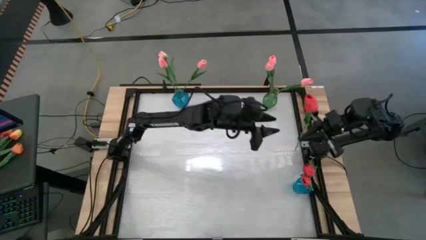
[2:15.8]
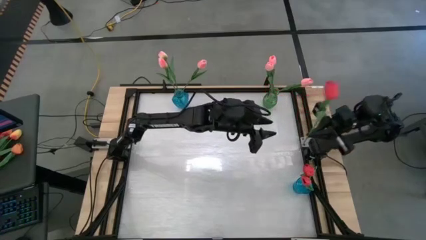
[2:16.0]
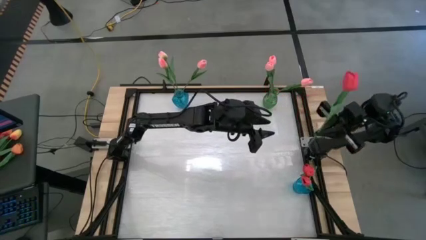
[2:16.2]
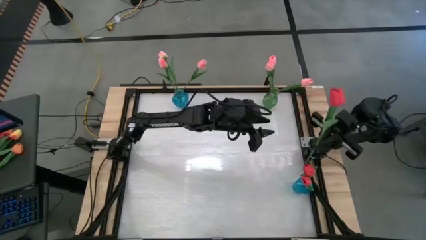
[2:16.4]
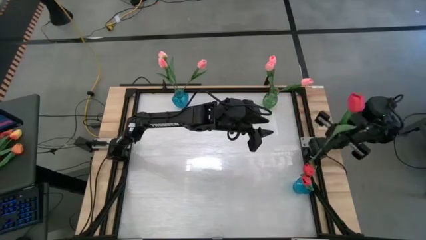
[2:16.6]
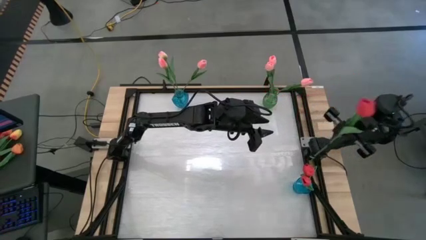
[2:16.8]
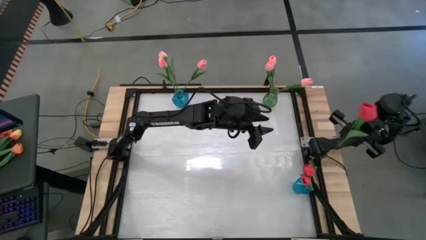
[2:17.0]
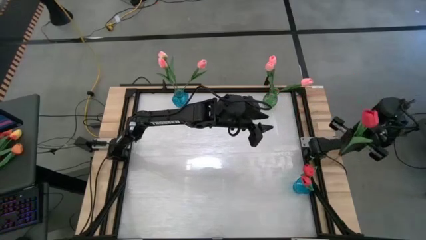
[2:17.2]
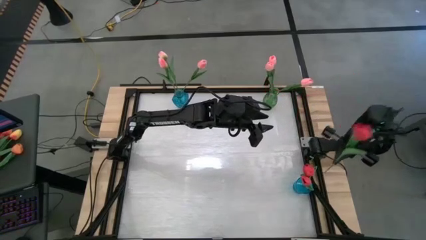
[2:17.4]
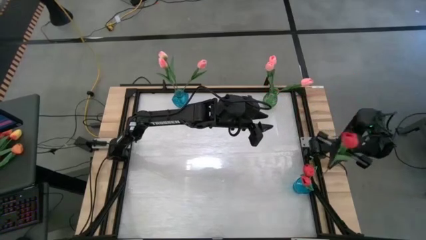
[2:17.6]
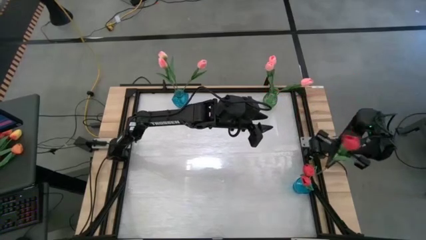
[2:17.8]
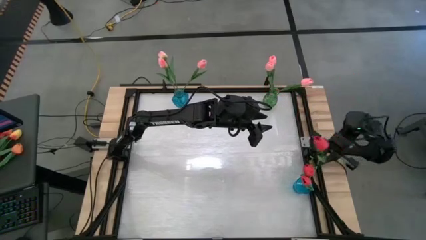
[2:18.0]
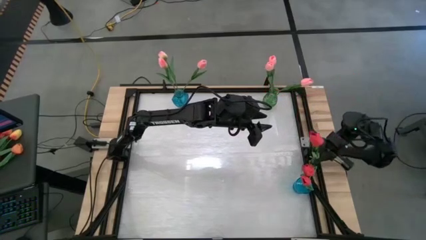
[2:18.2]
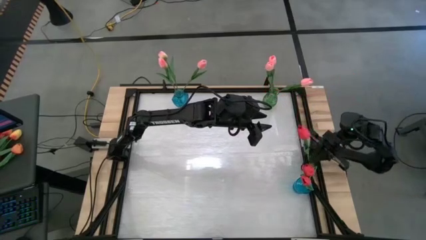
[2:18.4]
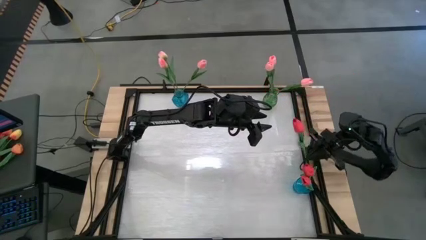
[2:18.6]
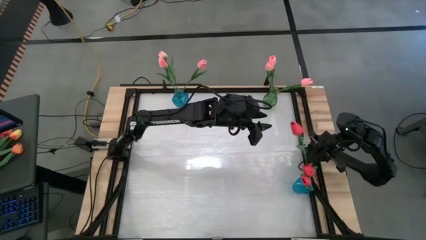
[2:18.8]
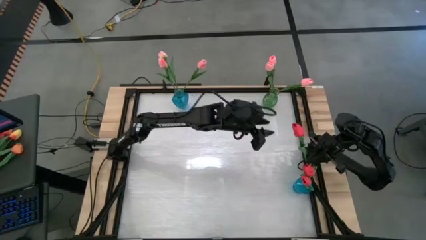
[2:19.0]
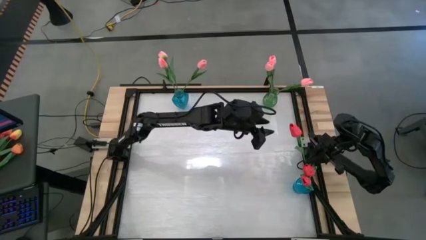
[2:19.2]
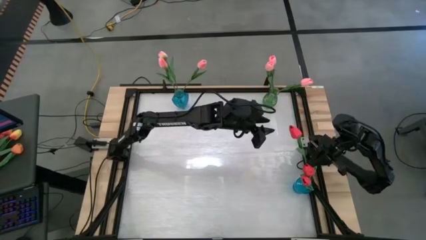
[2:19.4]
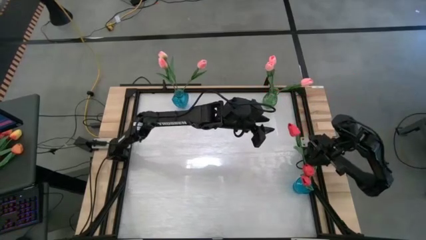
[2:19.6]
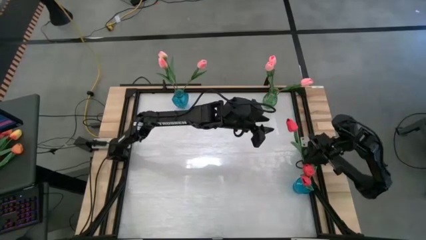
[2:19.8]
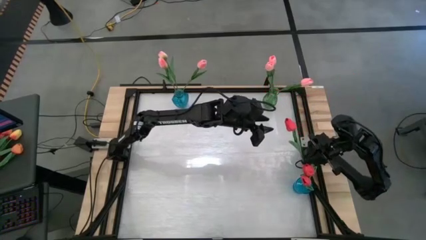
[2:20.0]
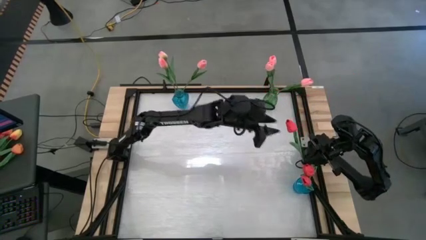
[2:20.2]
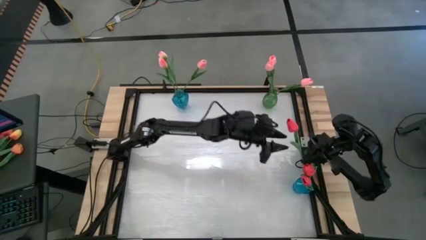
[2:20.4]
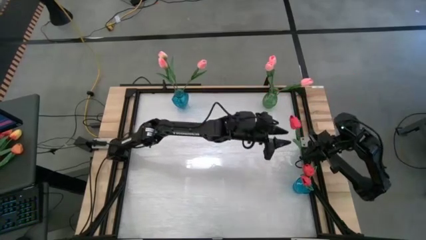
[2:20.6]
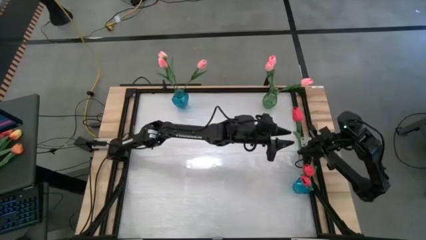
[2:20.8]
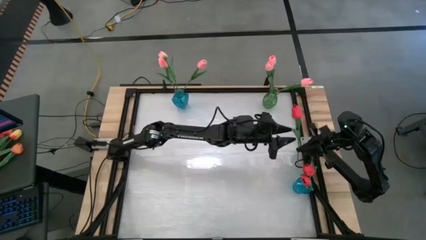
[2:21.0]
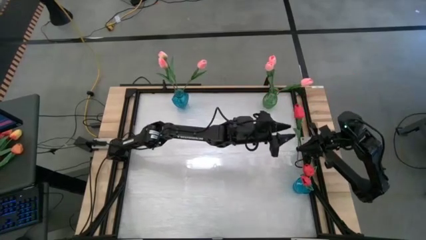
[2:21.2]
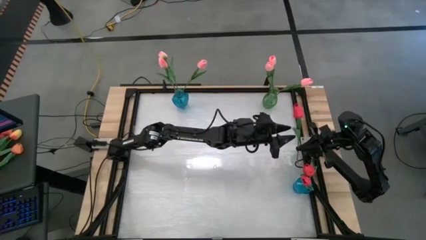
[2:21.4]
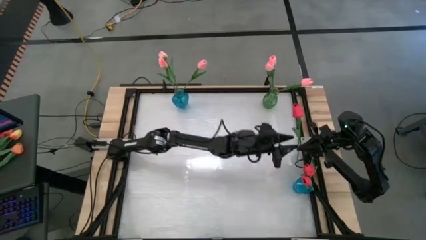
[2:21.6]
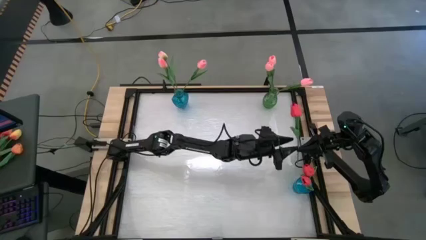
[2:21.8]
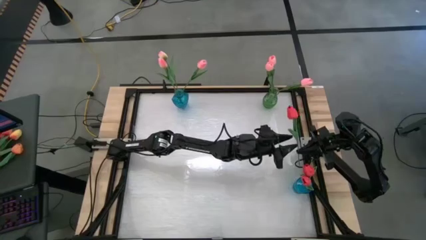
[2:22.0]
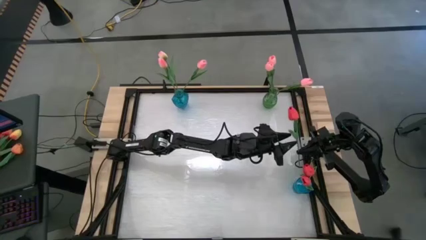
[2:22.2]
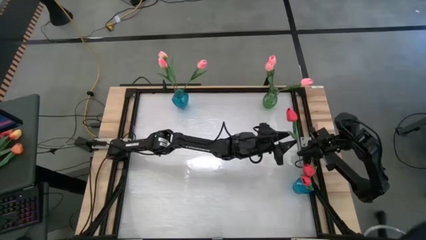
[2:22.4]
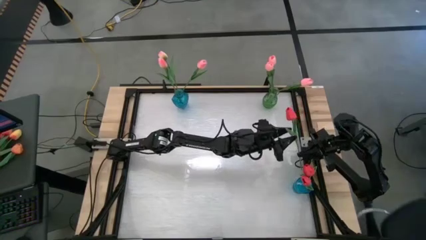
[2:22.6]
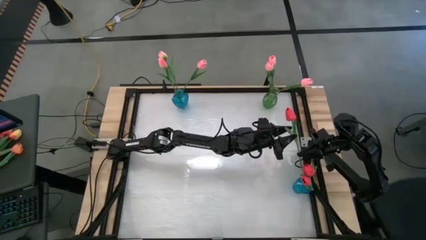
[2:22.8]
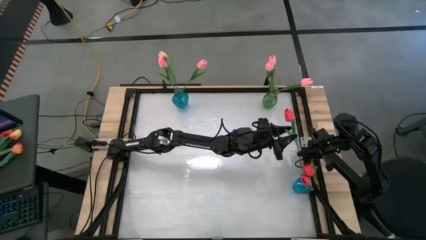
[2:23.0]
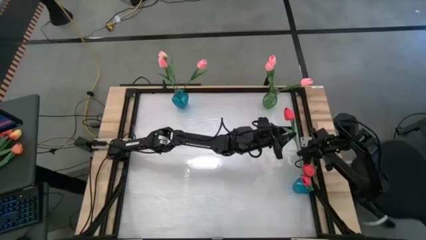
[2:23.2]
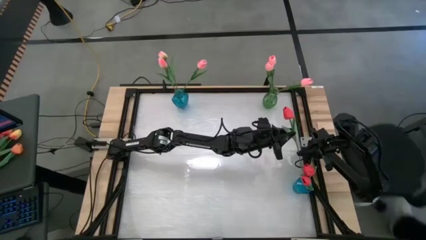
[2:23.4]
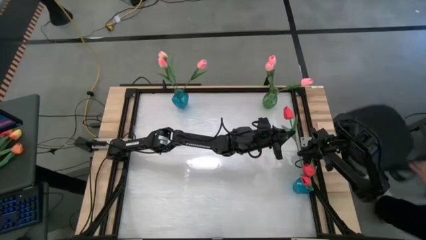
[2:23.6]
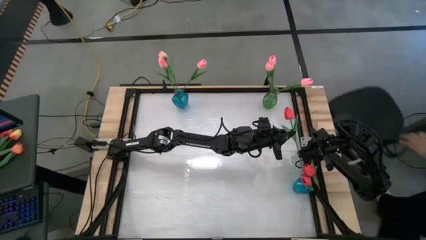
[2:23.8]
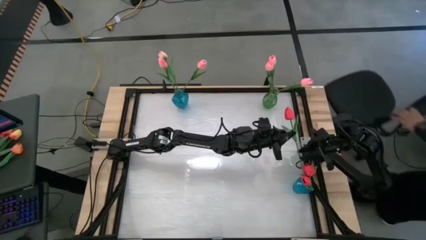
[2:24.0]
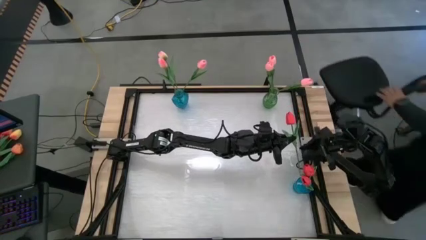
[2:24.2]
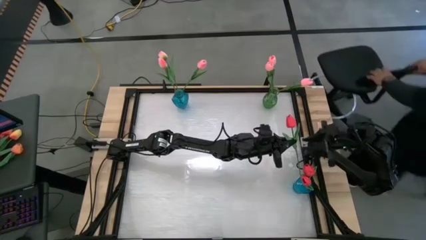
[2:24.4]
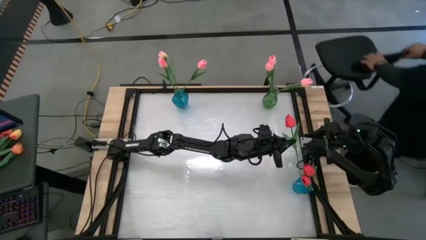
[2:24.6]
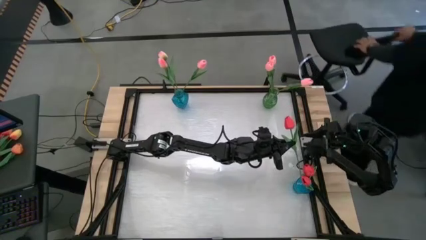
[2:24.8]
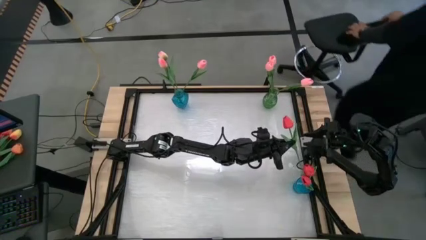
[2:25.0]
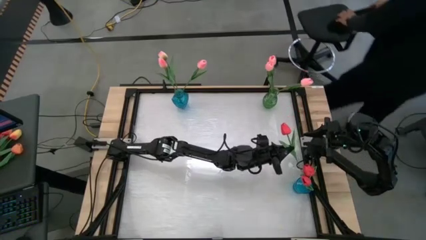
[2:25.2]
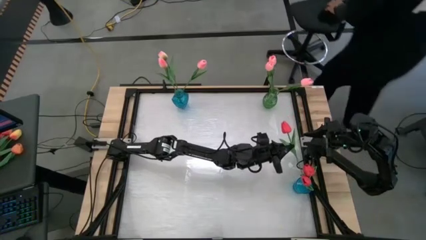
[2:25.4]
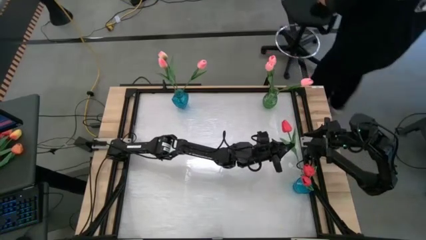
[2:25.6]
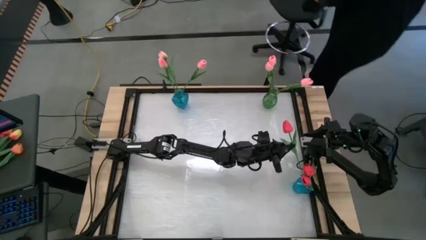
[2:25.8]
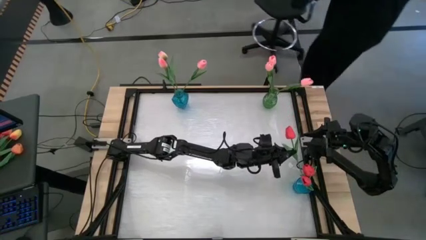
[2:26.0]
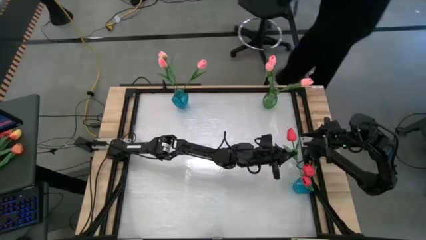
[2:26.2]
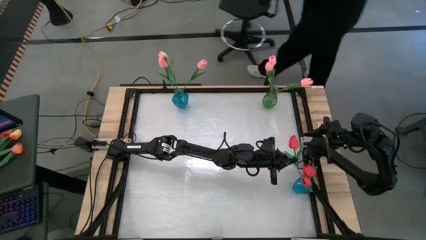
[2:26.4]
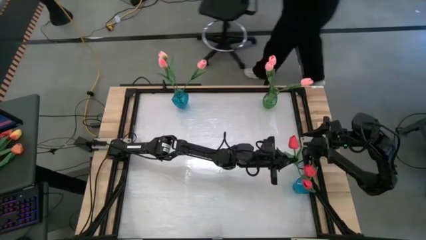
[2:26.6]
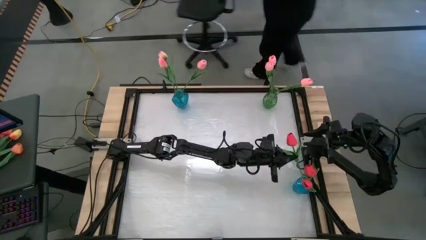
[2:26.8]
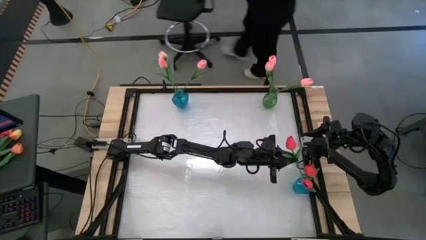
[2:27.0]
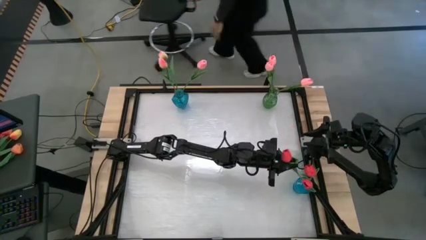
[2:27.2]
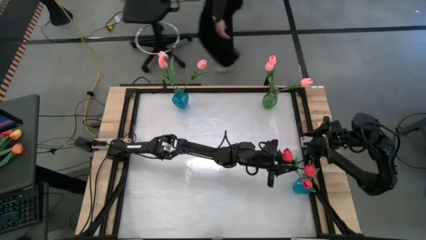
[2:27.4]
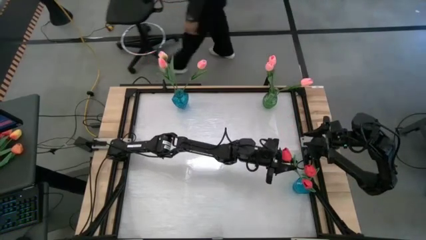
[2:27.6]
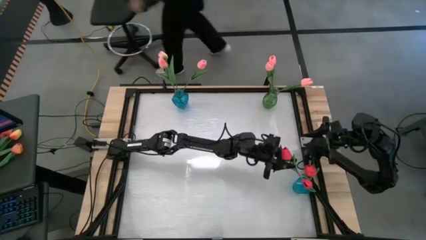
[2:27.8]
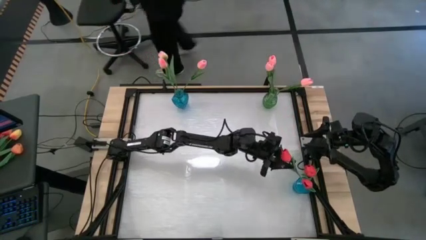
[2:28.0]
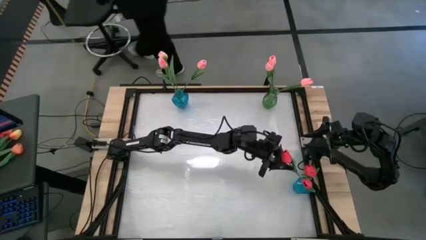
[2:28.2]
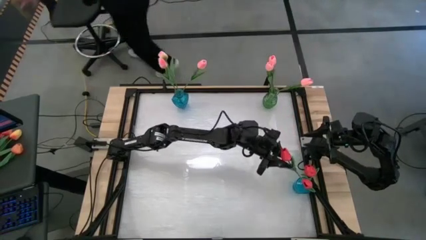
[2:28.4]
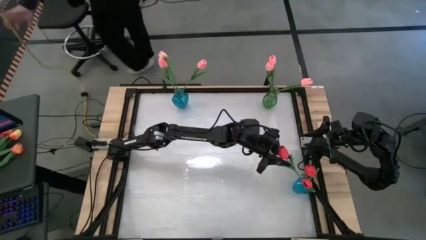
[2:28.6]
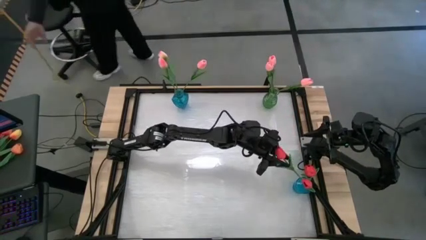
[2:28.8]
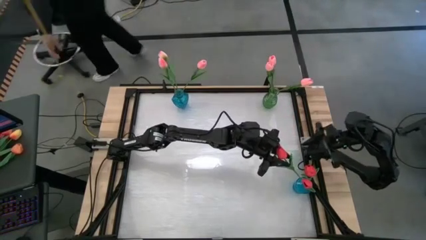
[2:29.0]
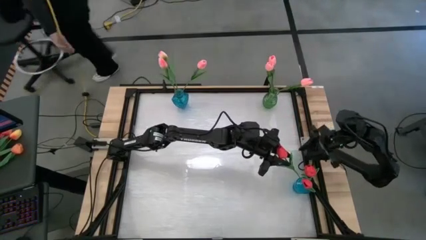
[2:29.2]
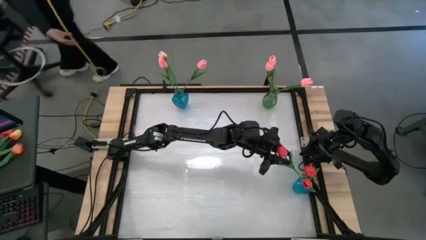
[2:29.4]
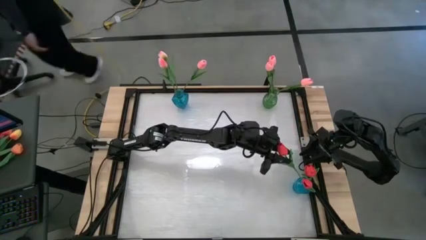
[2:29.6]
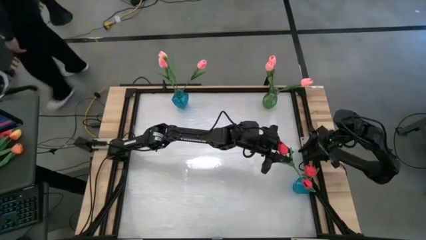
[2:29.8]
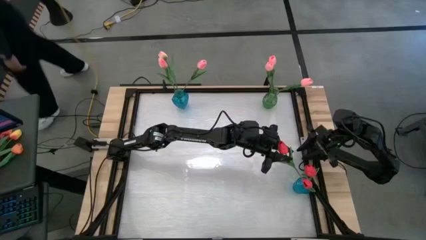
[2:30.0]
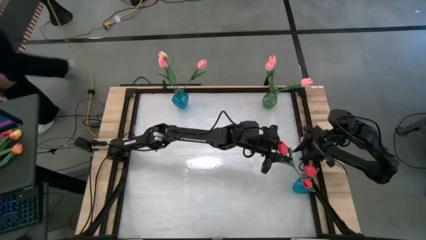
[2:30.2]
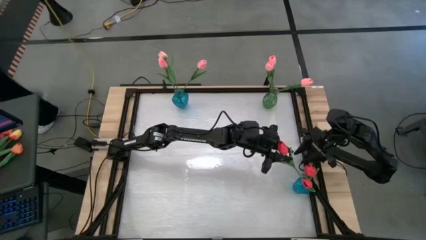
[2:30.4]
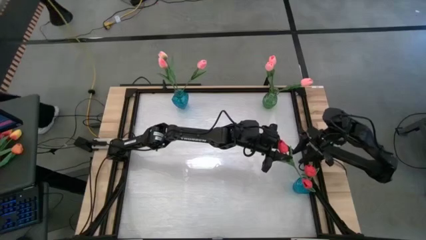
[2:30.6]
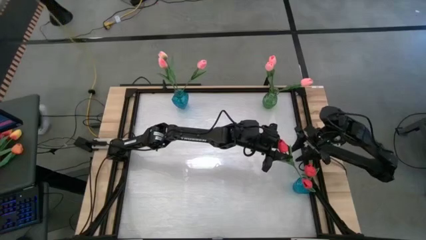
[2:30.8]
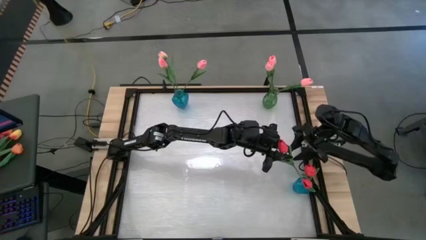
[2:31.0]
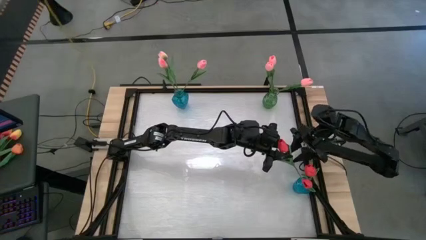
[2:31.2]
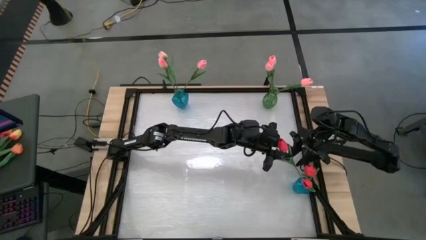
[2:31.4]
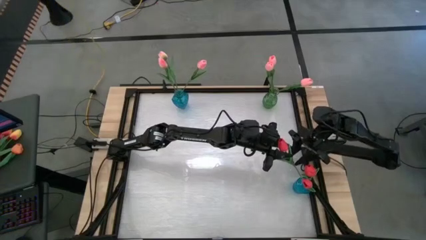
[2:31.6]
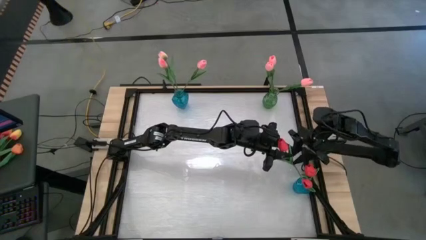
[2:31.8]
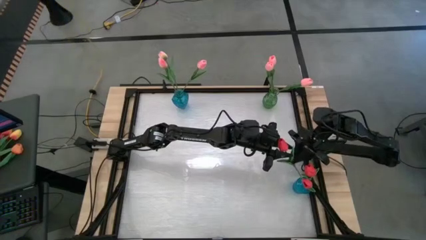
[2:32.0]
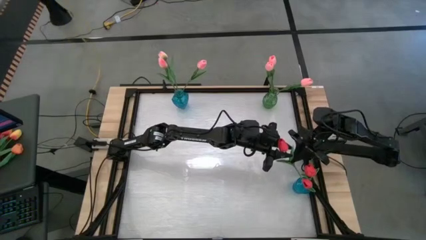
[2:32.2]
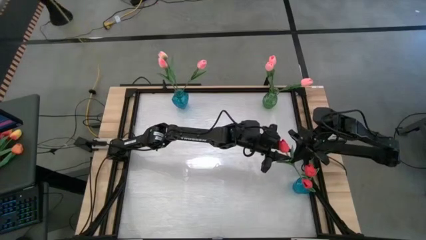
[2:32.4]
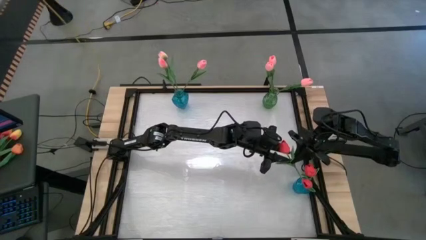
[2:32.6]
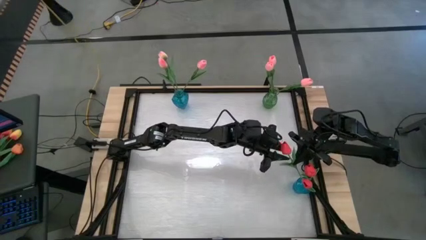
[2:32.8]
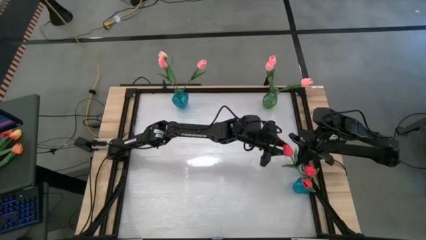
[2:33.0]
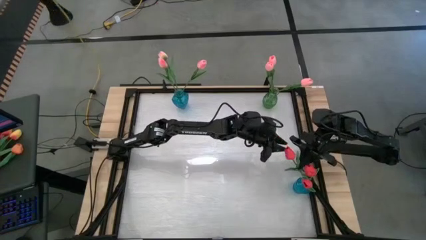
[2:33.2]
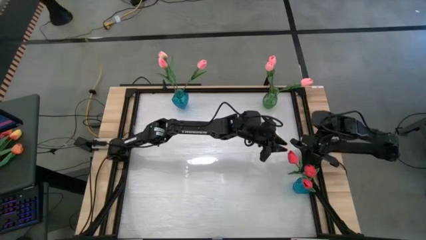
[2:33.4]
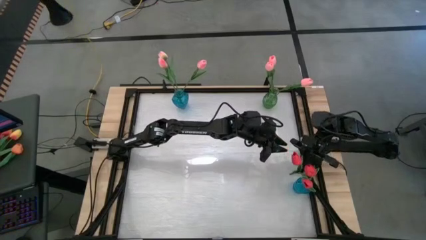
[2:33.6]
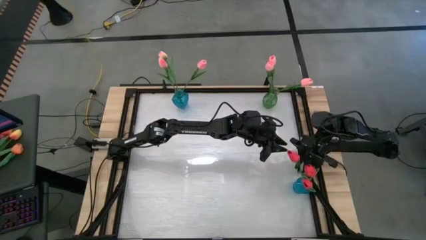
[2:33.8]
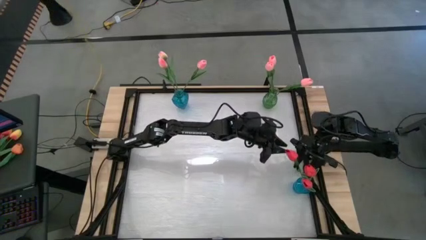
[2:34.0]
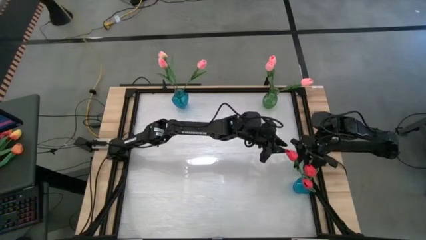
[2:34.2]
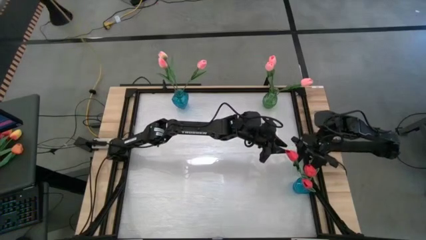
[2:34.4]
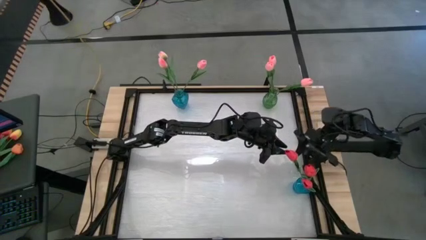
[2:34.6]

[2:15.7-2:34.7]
Task: Sort flowers into vase by color
Put the red tulip into the bottom blue vase
